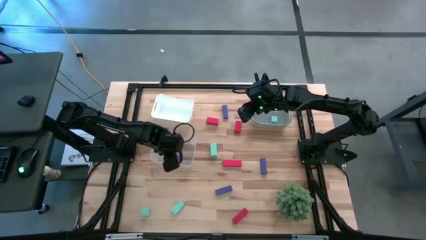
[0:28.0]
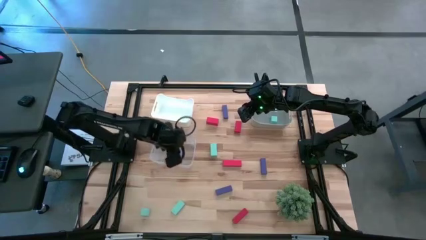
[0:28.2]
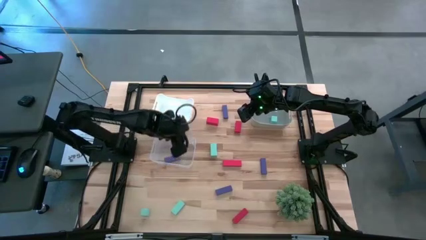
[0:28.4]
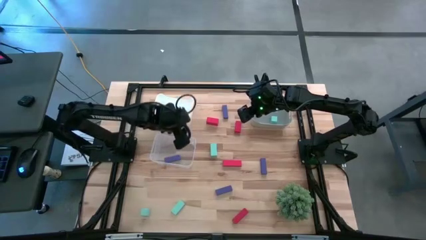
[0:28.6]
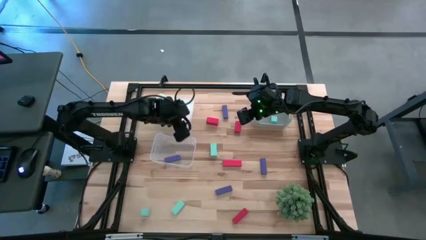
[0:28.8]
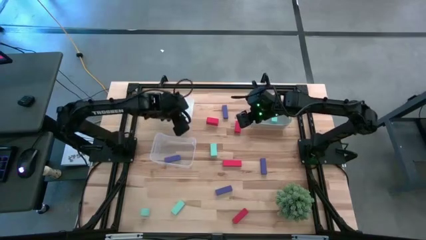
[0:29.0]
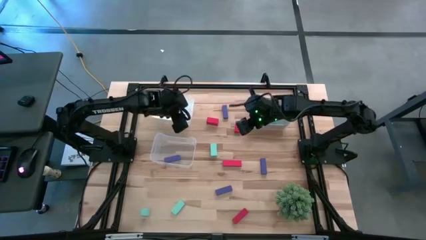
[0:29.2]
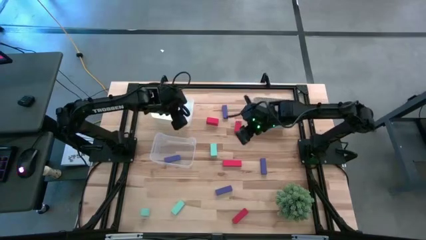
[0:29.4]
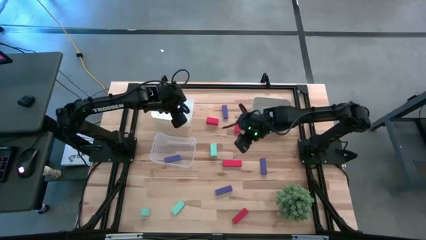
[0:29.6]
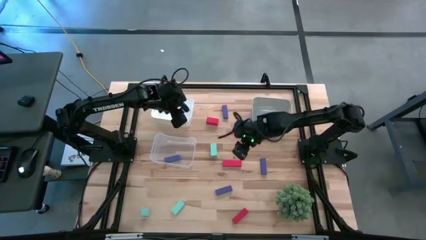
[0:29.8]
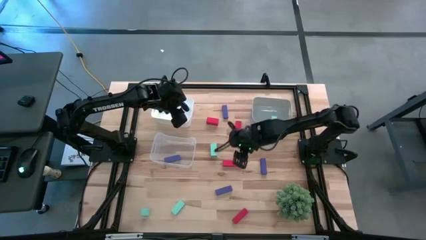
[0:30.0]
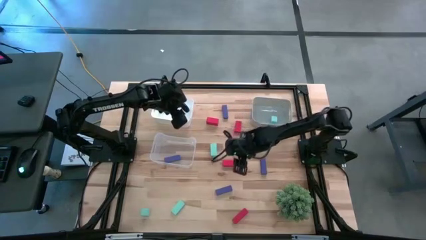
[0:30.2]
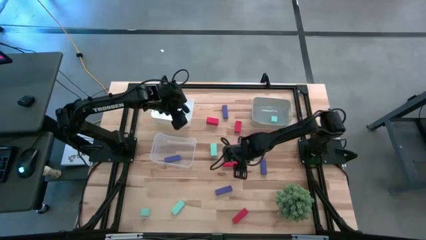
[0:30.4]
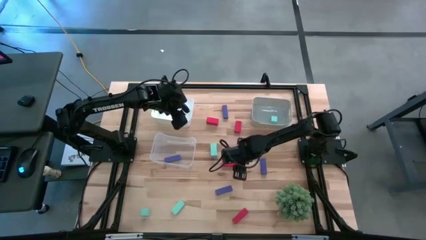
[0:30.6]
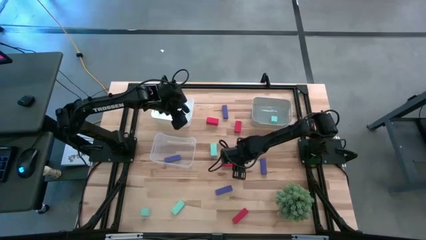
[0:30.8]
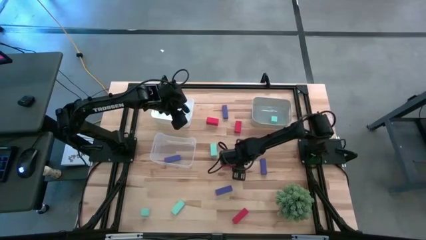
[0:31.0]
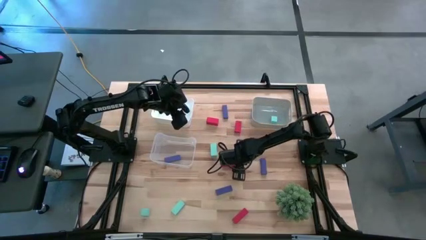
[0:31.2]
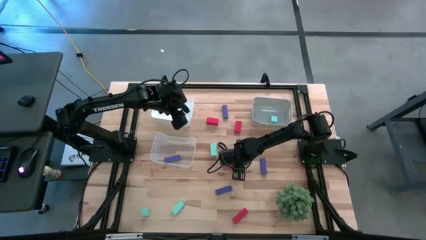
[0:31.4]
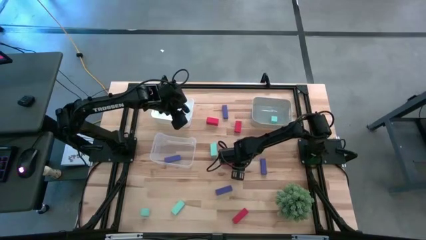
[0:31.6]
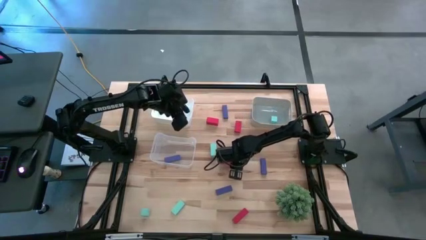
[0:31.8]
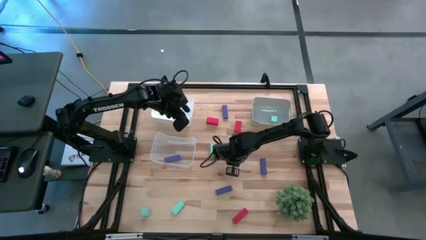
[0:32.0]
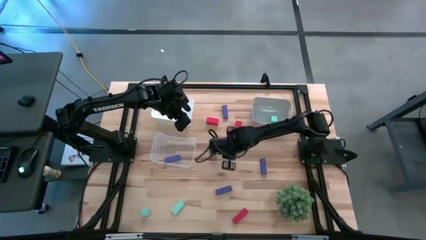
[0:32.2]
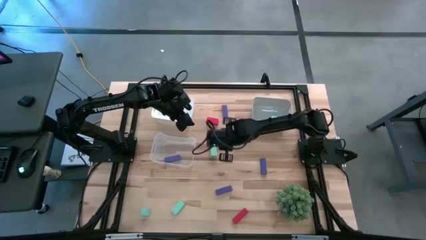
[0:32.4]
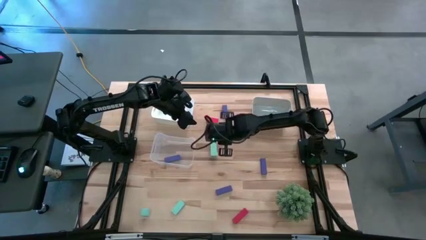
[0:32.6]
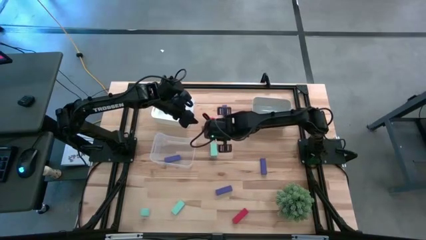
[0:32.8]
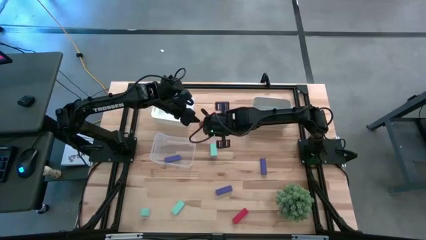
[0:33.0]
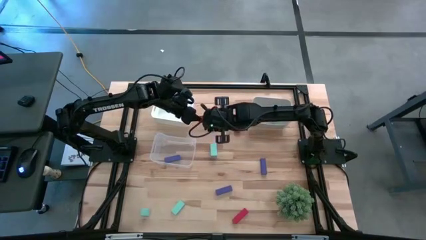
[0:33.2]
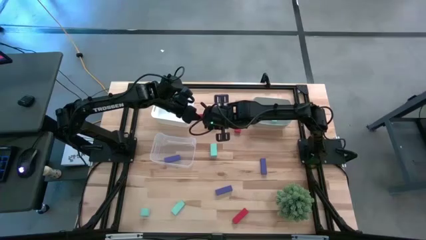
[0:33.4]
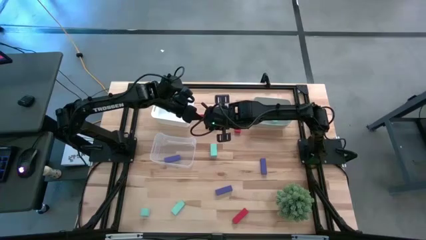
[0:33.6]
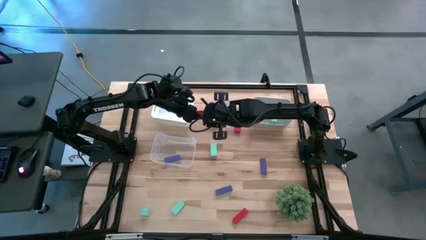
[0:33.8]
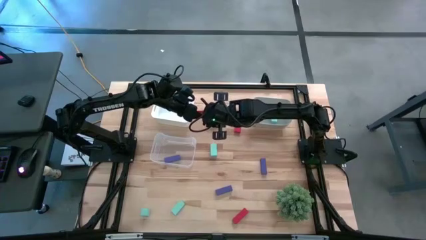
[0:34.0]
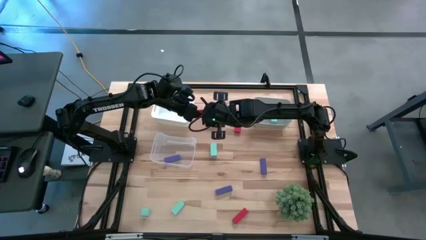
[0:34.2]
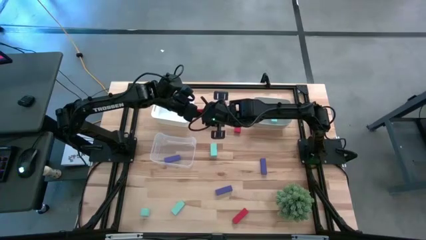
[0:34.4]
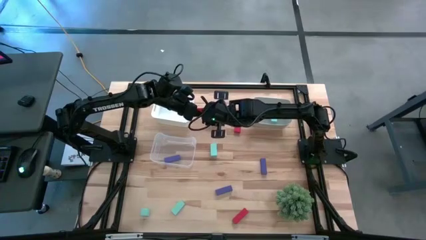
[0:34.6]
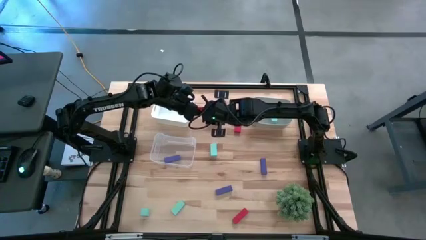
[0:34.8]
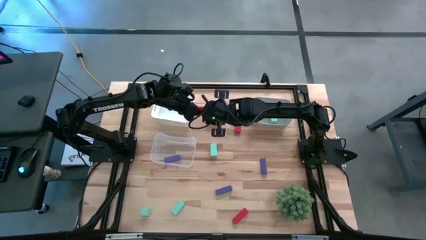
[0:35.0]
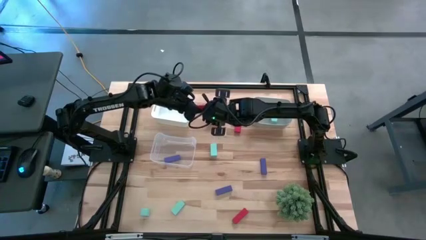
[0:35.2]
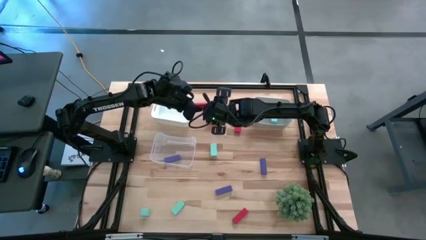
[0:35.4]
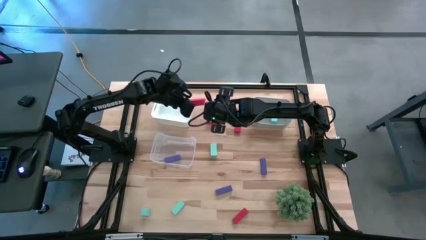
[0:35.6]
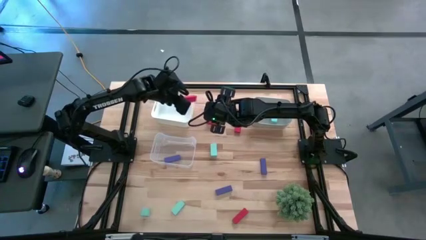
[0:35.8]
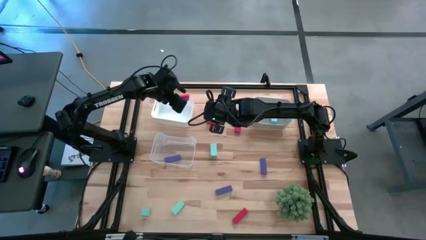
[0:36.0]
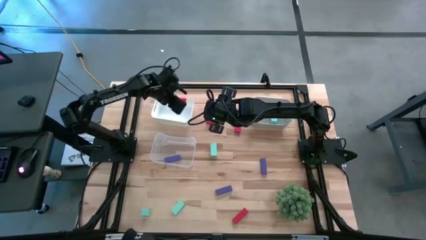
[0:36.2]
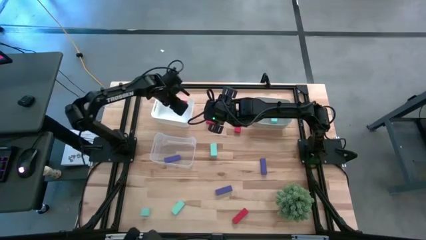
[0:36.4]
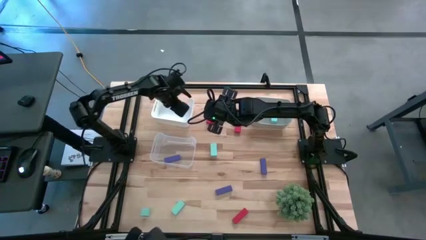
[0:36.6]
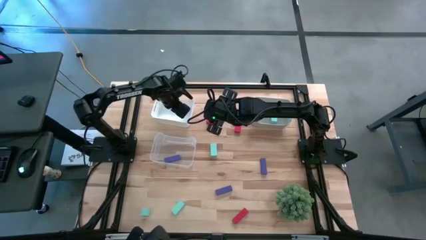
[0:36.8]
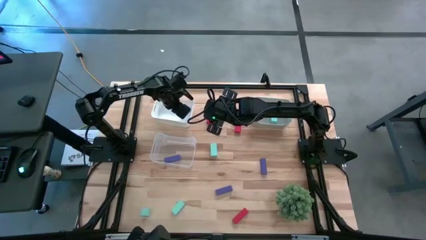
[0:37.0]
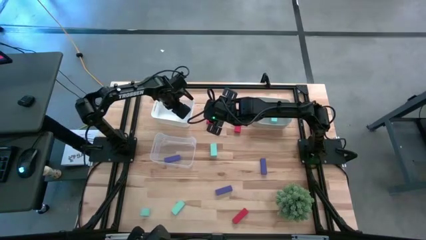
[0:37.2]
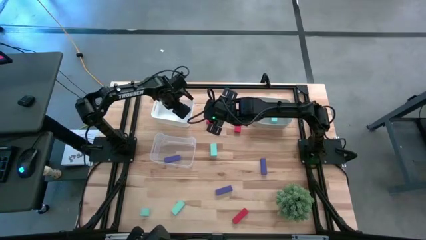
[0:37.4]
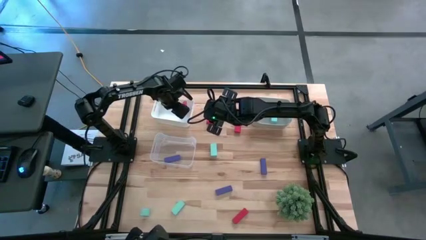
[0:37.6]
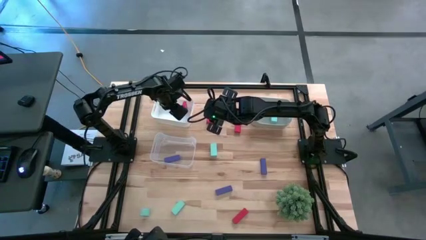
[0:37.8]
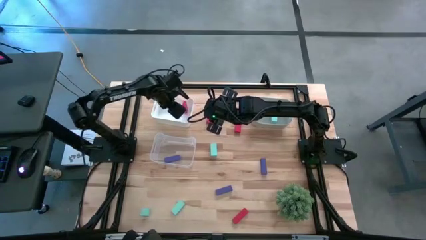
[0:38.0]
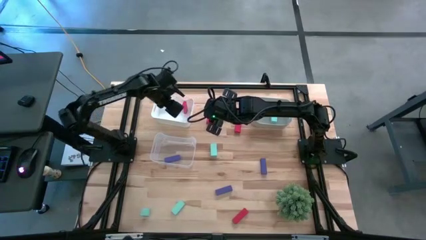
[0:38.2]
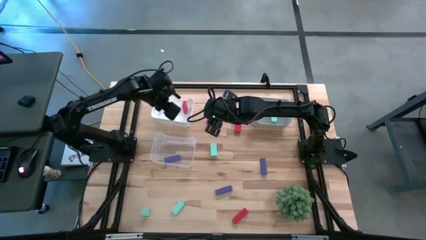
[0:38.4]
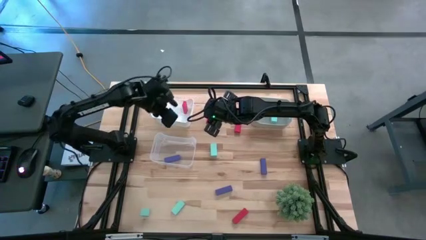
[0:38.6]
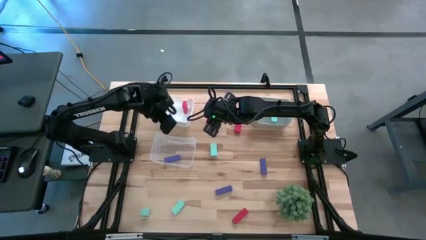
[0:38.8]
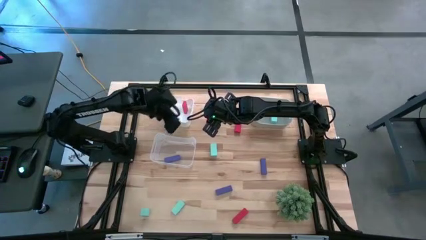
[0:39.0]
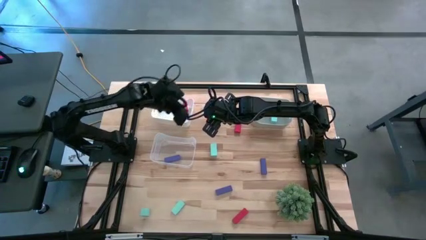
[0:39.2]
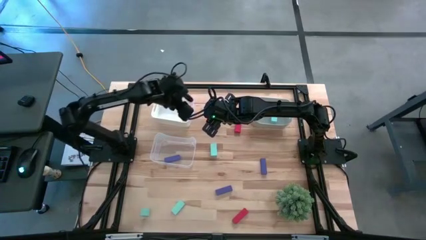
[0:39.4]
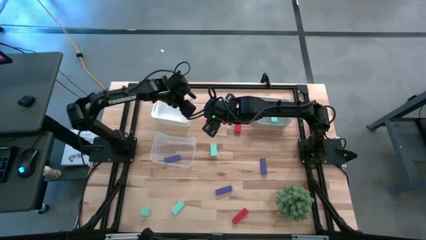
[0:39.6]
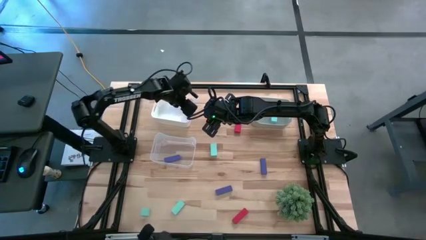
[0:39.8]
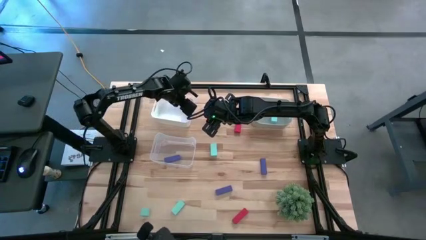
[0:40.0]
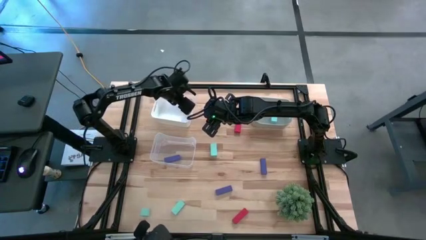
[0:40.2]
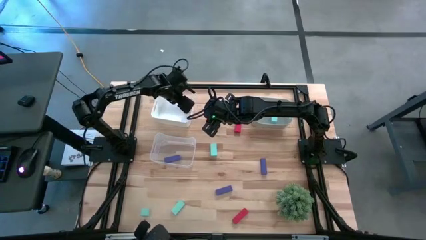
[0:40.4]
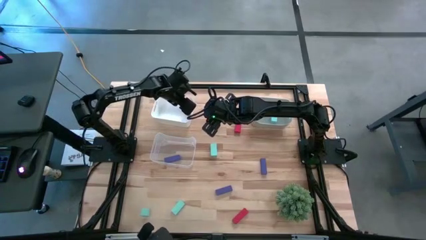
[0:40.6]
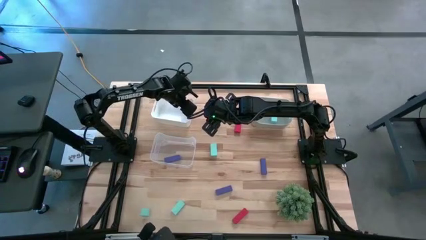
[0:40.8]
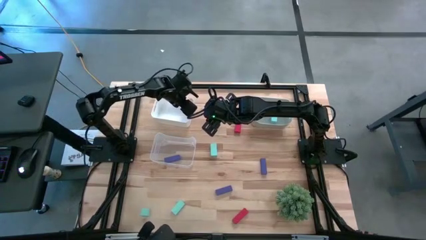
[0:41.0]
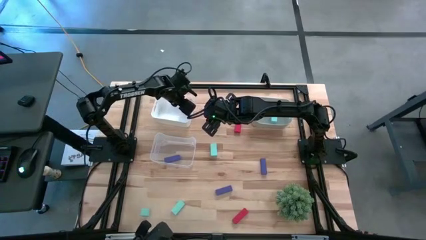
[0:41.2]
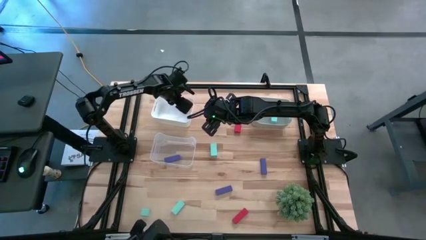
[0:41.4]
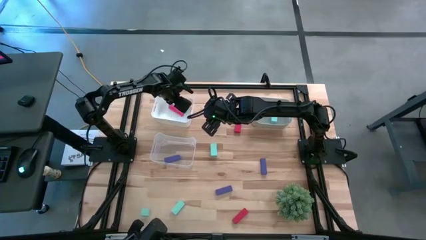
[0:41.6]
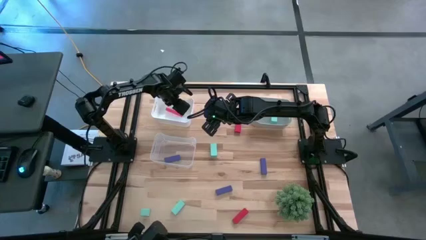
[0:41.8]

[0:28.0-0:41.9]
Task: Sort & place blocks by color
Put the red block into the white bin
